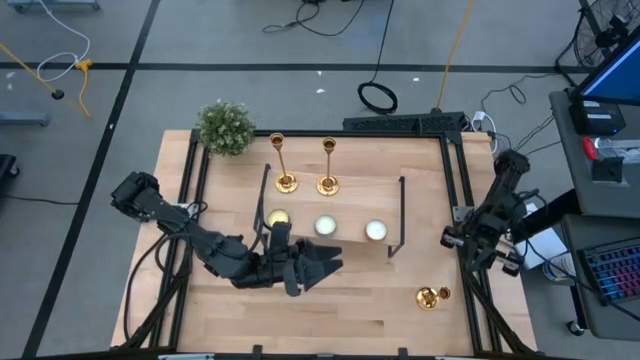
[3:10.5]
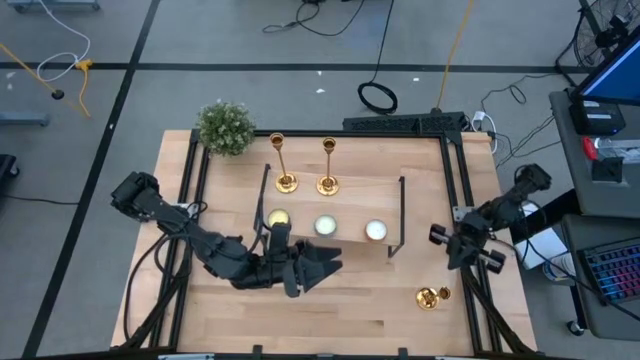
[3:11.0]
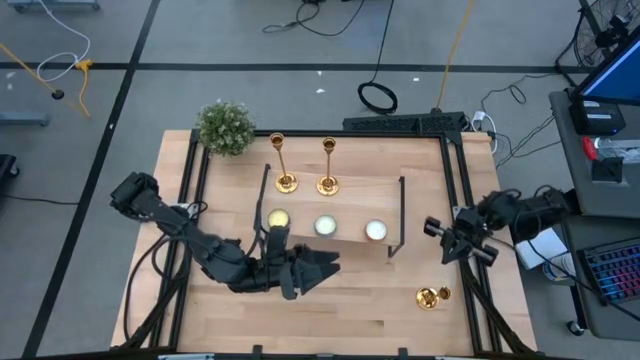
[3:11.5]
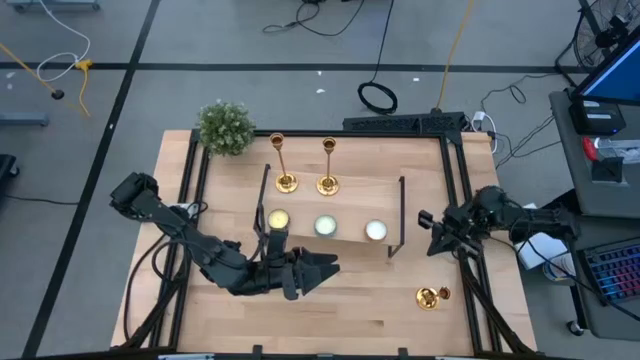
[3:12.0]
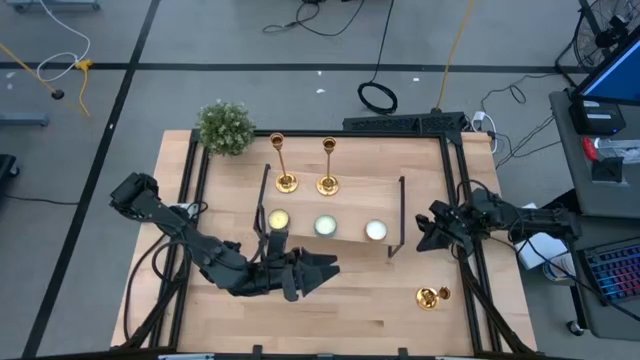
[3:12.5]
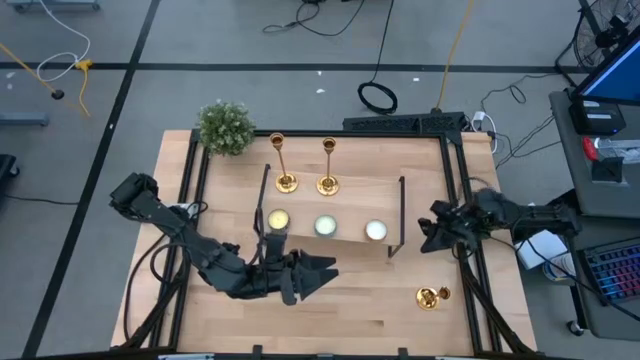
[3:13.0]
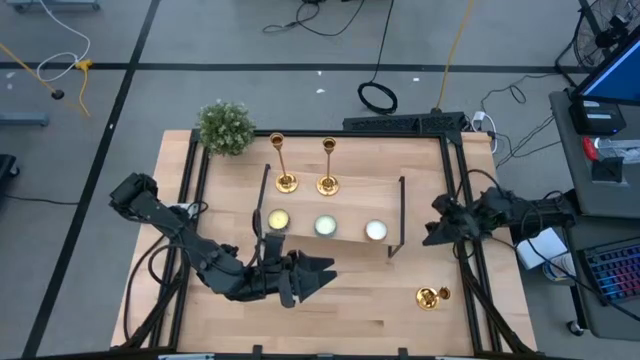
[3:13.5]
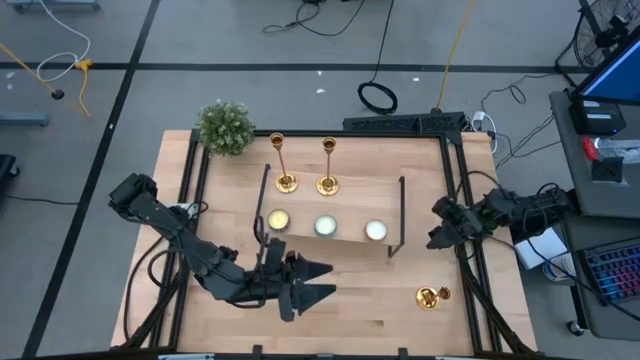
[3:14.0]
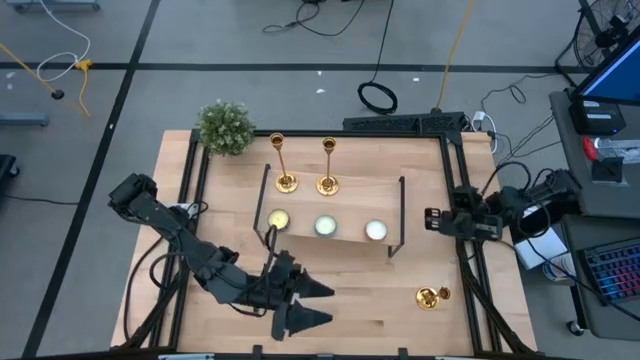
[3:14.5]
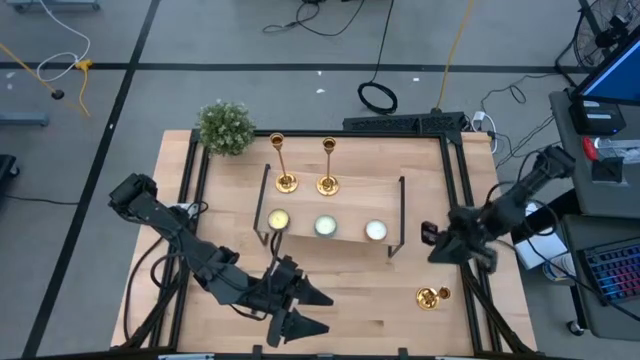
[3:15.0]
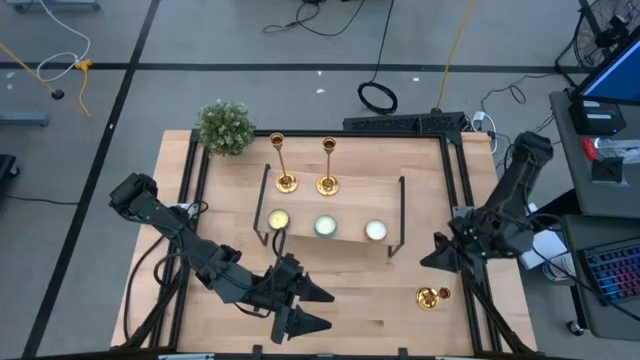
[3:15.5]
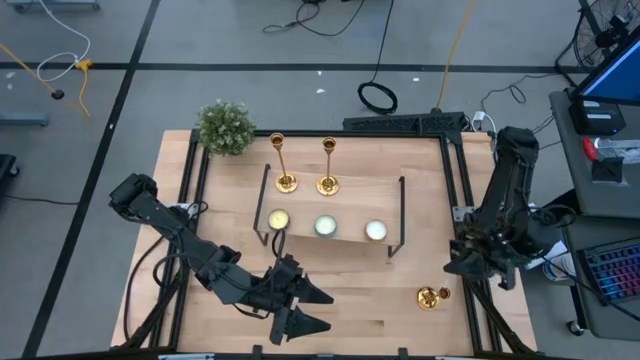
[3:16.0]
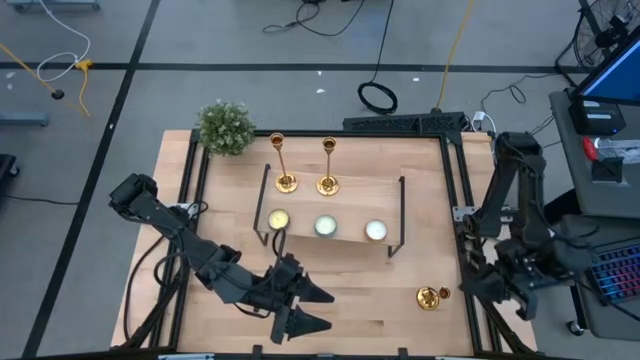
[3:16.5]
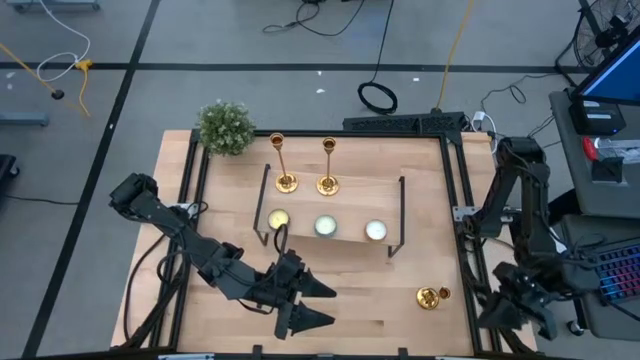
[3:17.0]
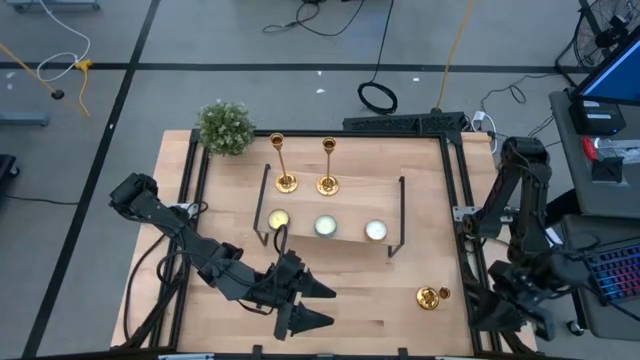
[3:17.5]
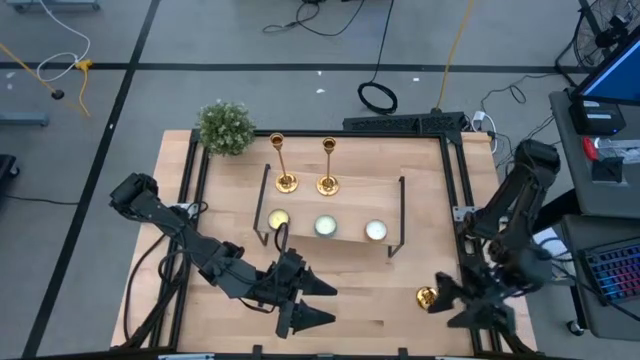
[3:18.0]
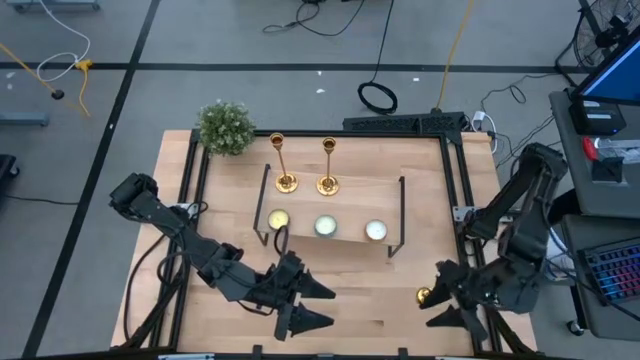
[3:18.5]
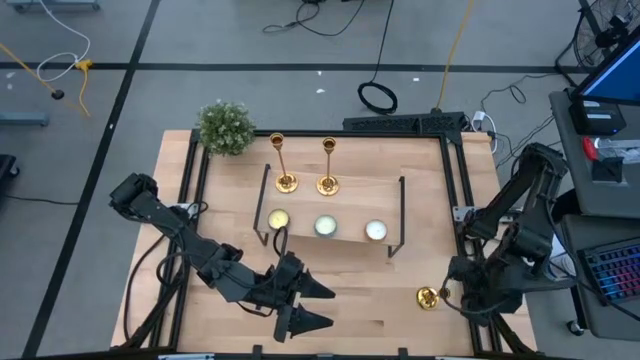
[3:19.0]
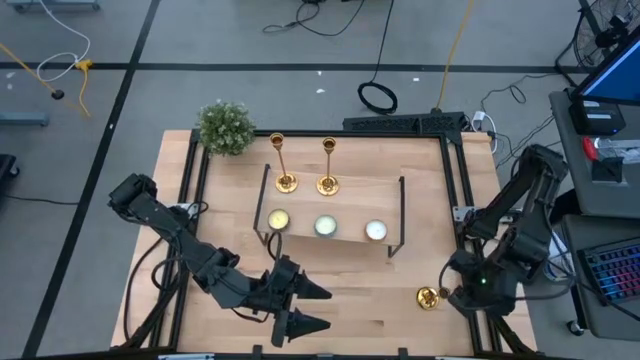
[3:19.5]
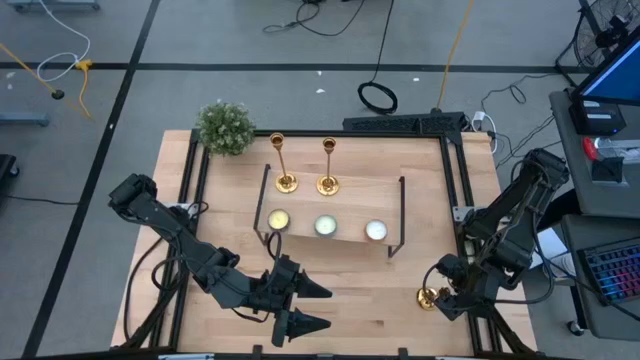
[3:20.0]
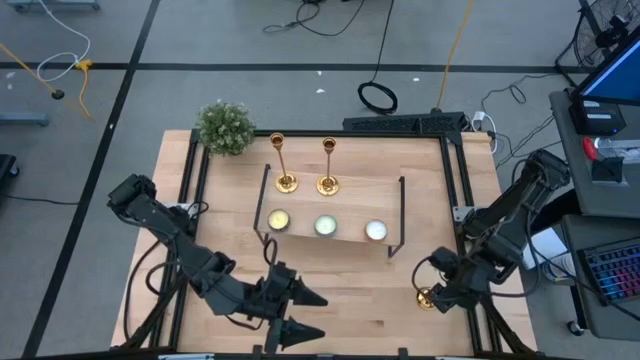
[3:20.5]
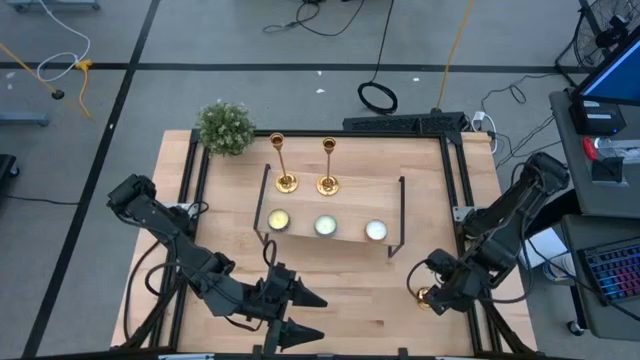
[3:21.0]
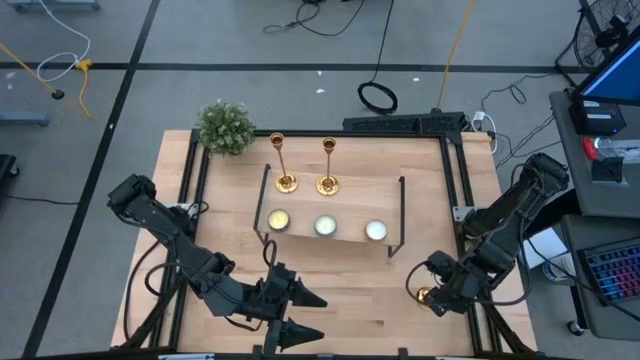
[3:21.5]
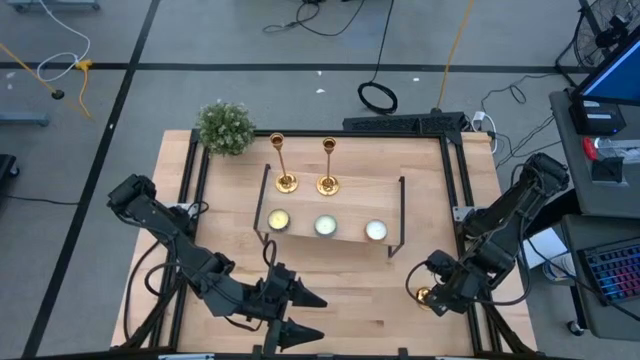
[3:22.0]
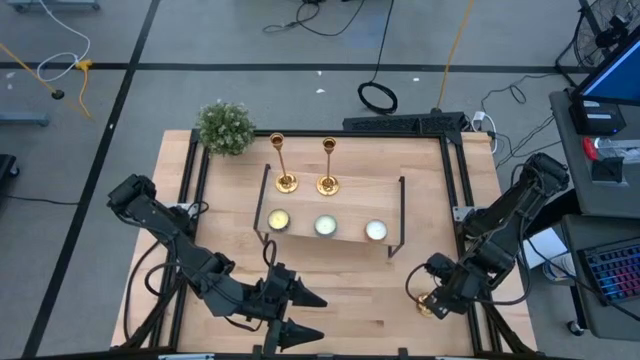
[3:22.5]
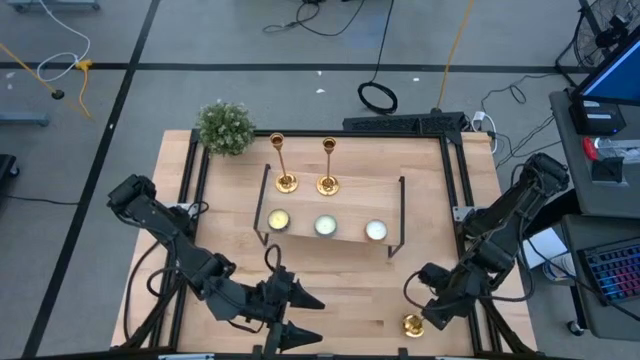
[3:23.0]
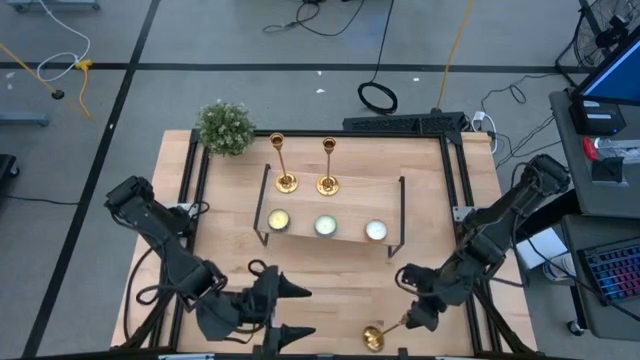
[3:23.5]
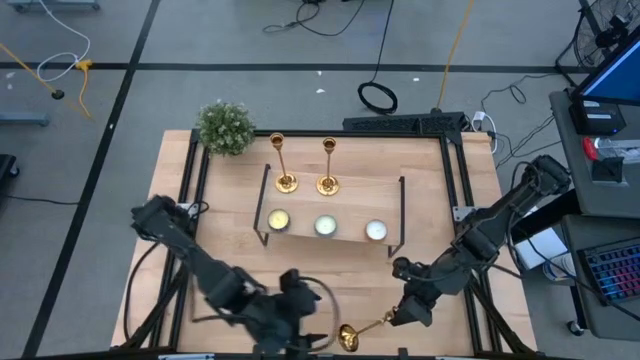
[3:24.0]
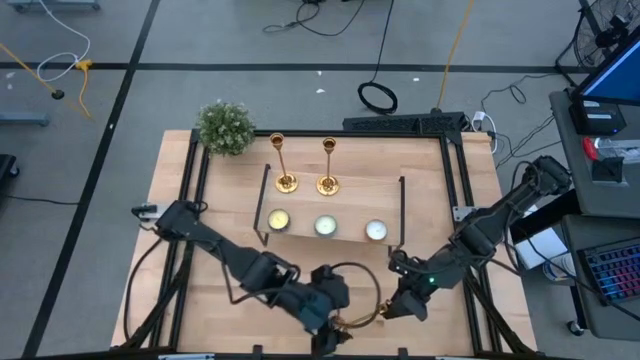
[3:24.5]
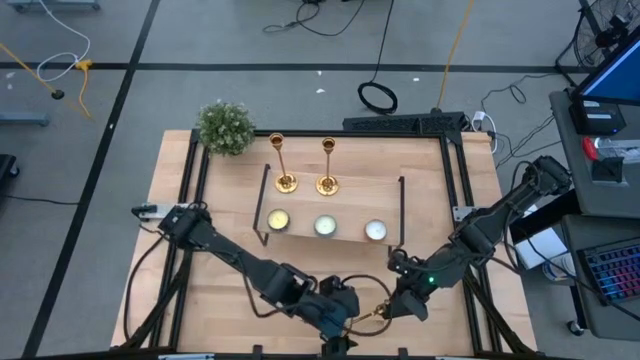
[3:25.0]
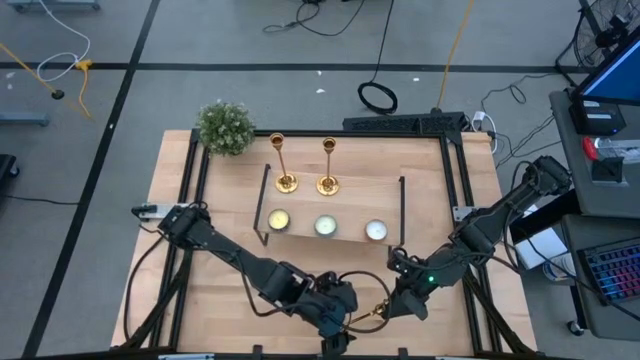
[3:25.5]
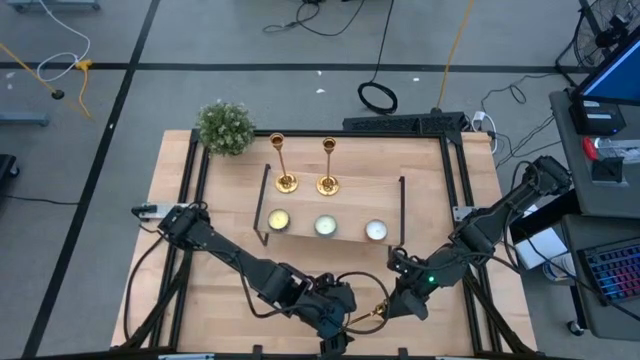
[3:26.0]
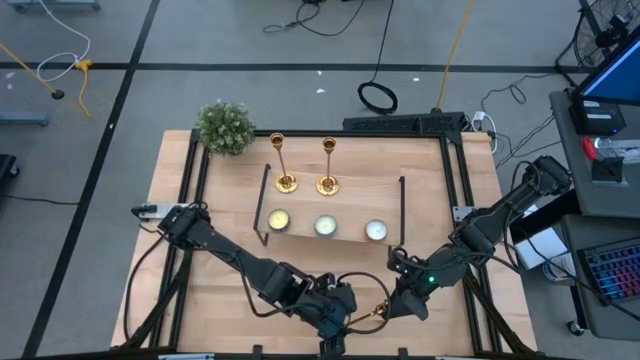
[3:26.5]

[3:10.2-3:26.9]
Task: Pick & Place candle stick holders
Put the gold candle holder onto the shelf

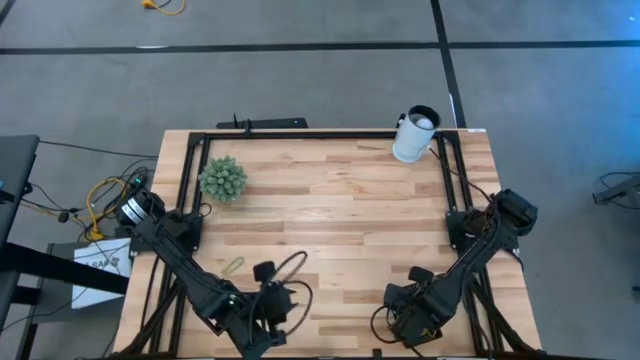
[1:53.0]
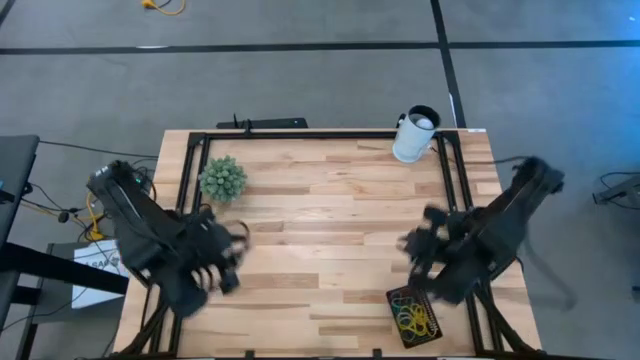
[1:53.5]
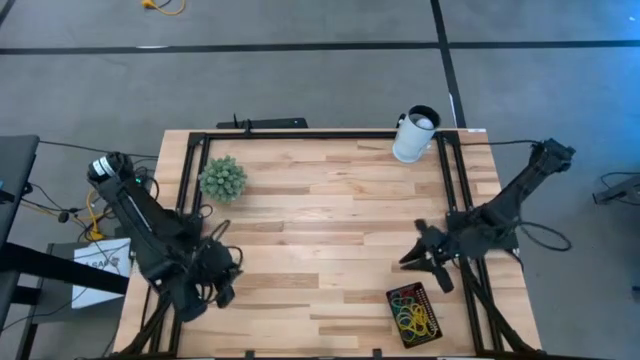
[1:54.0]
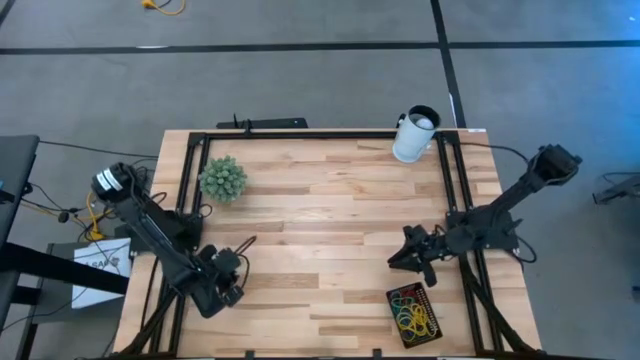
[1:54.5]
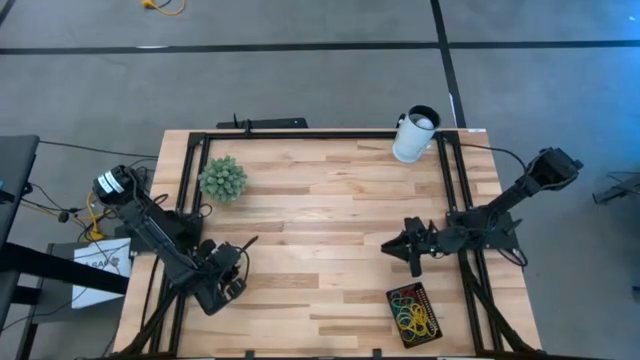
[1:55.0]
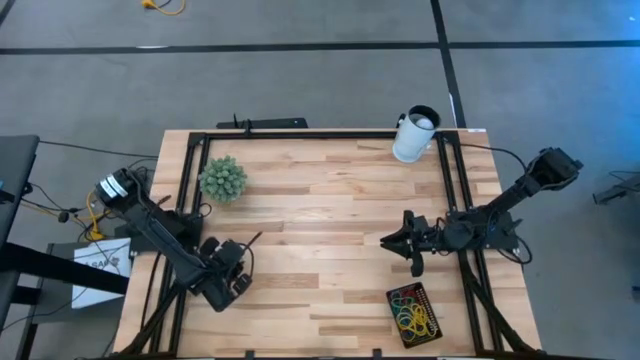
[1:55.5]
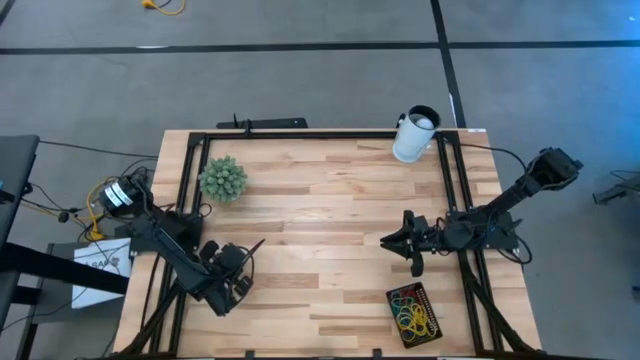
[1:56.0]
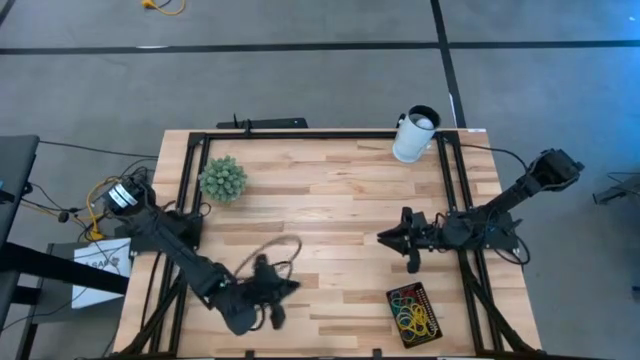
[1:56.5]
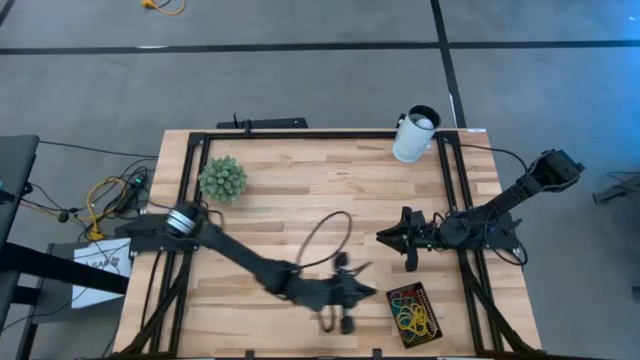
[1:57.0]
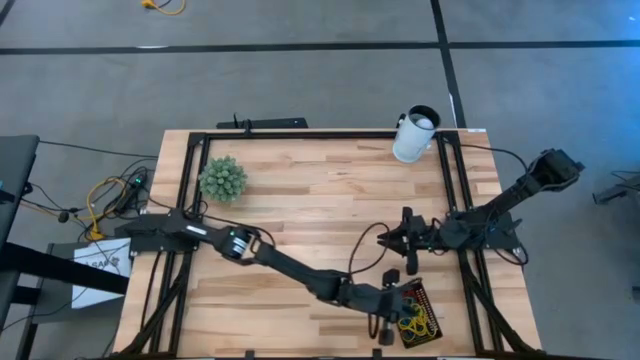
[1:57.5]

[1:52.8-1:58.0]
Task: Pick and place rubber bands into bin
Put the green rubber band into the black basket
